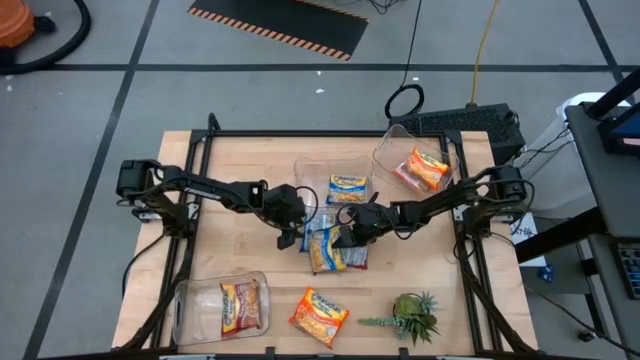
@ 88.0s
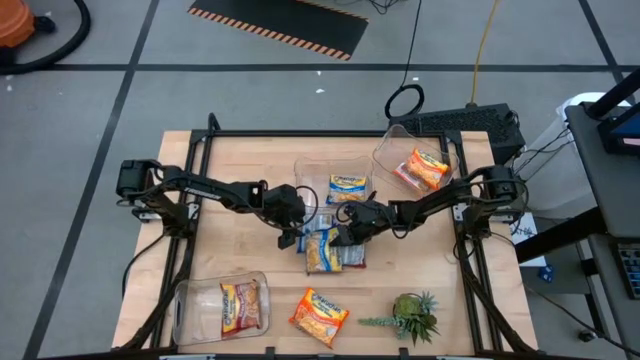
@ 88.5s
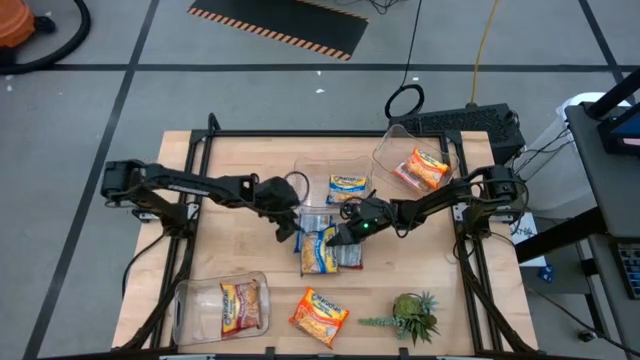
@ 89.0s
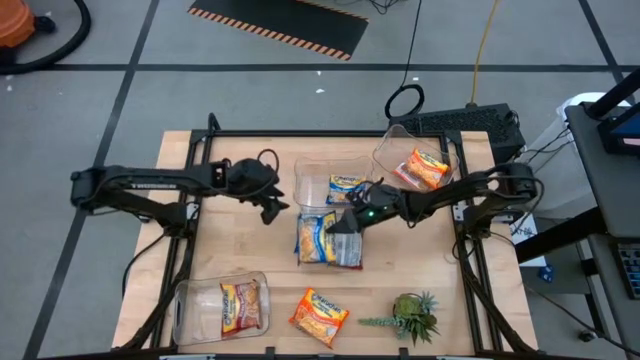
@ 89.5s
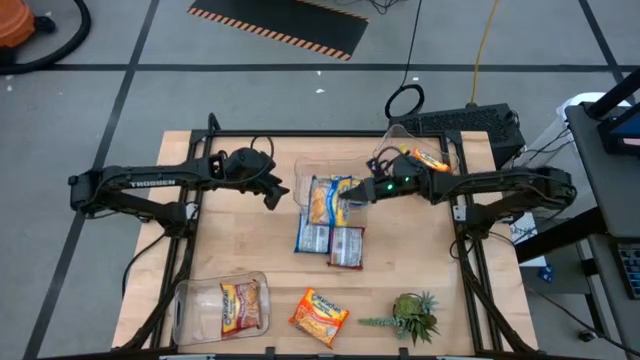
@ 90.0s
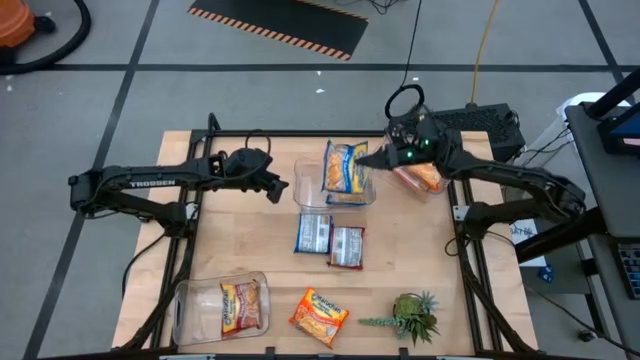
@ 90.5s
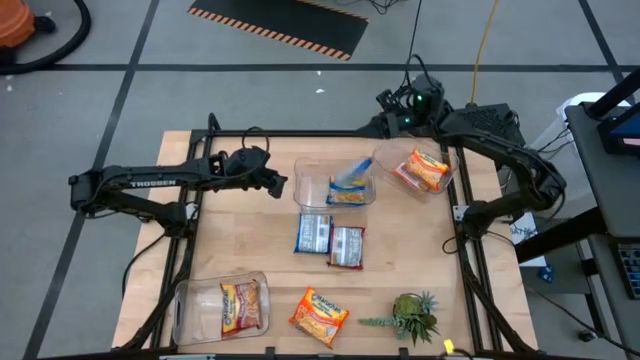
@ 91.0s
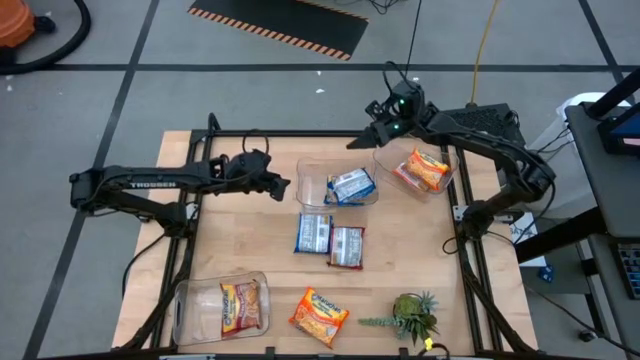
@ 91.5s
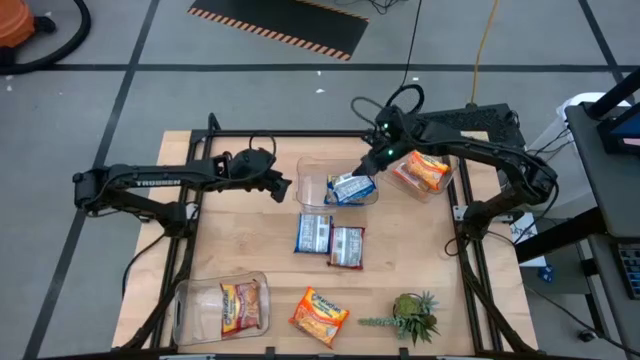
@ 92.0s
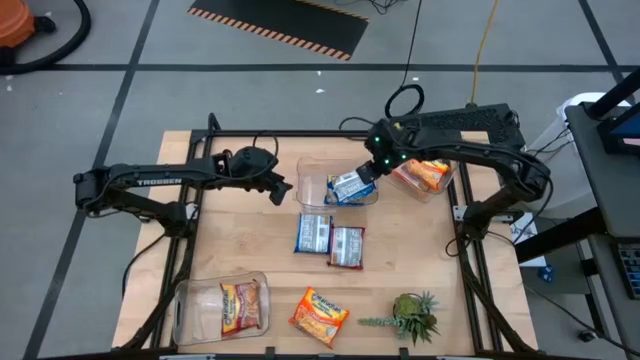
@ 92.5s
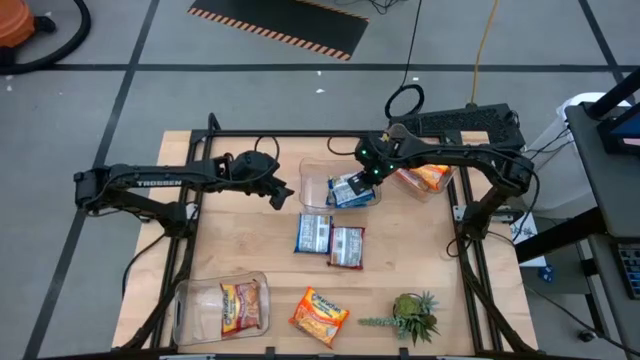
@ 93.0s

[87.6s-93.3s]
Task: Sort Maruchan noodles
Stack the bottom blue noodle pack on top of the other blue noodle pack into the top left transparent bin

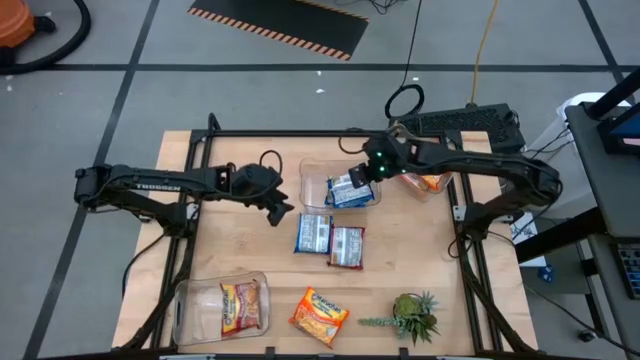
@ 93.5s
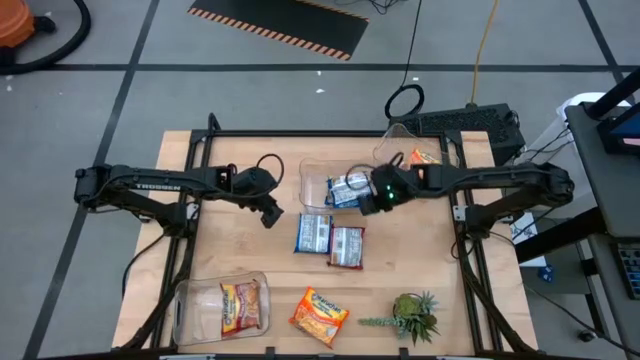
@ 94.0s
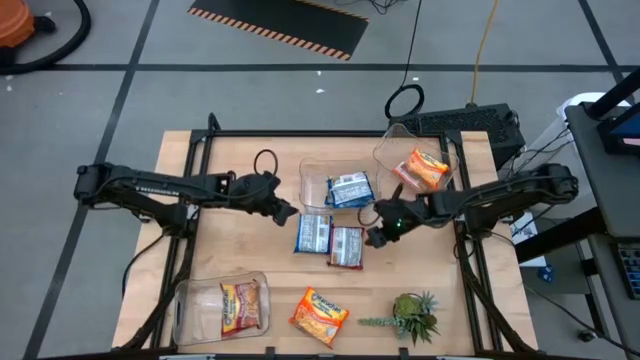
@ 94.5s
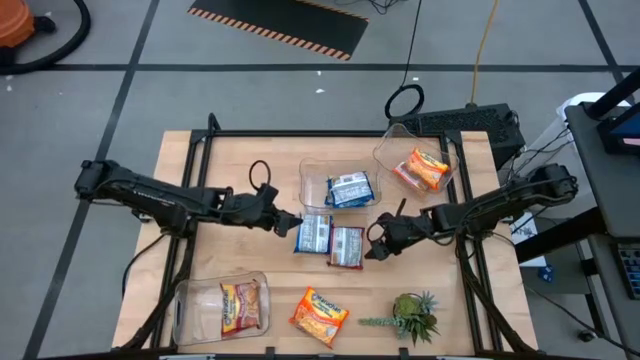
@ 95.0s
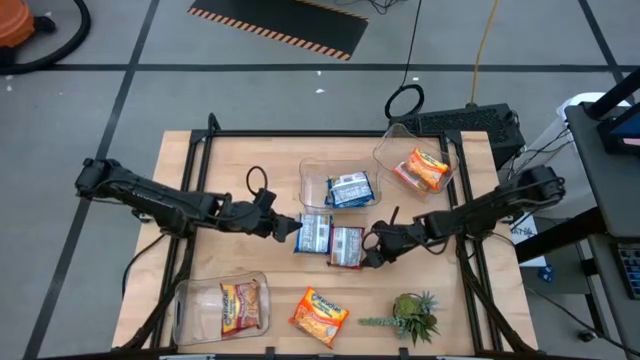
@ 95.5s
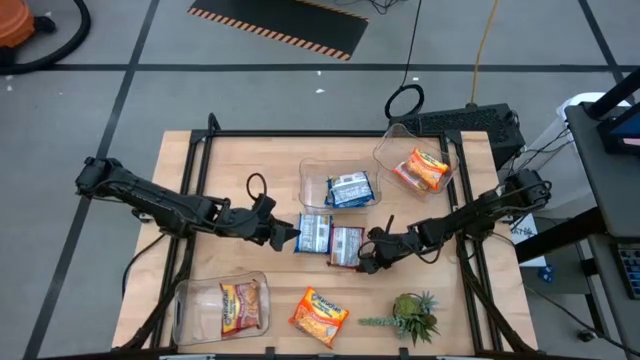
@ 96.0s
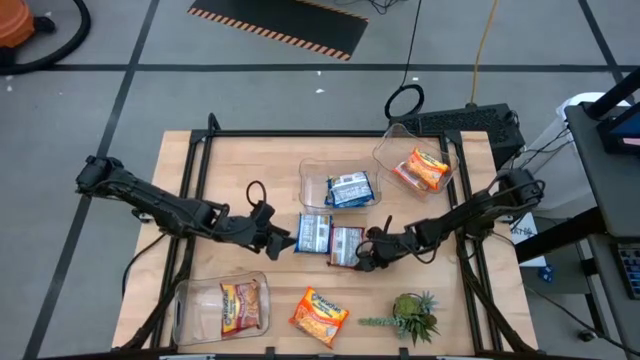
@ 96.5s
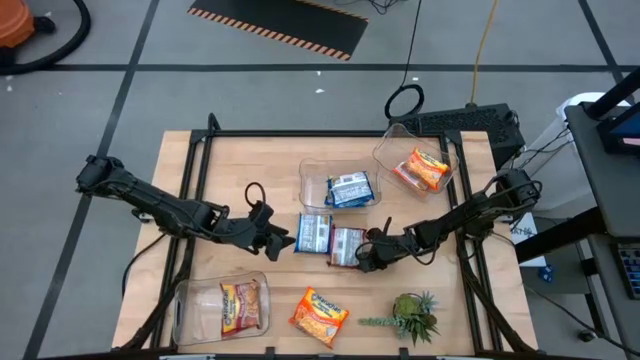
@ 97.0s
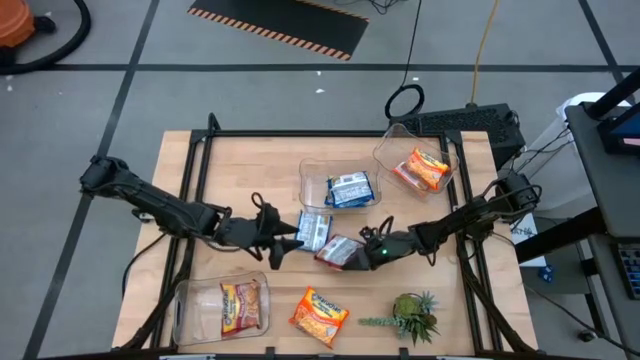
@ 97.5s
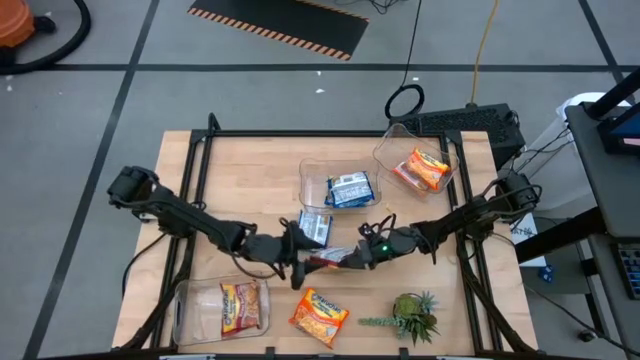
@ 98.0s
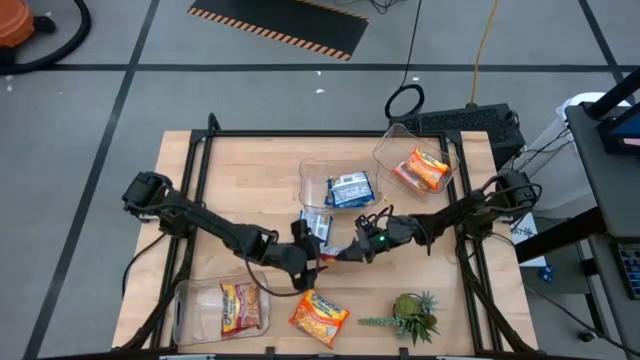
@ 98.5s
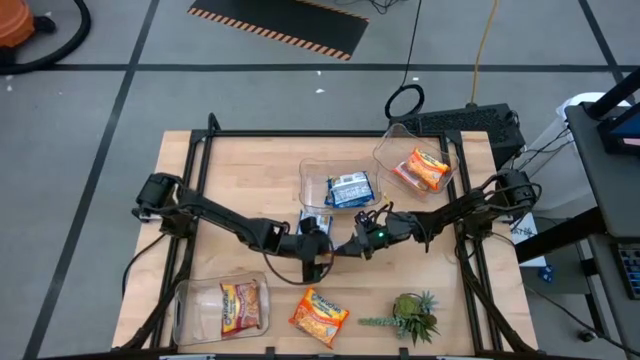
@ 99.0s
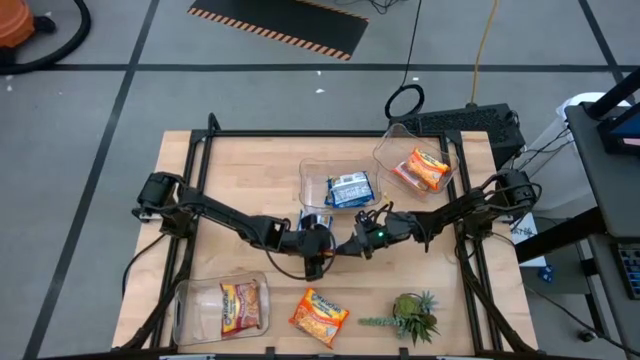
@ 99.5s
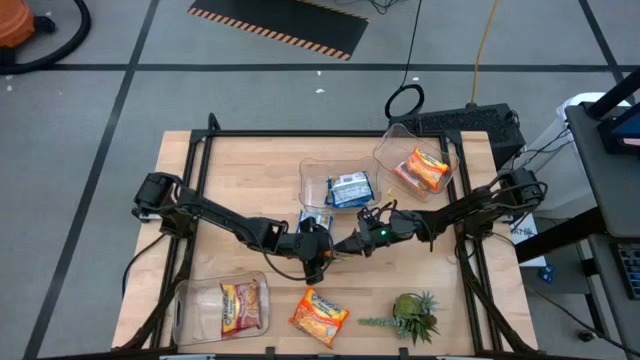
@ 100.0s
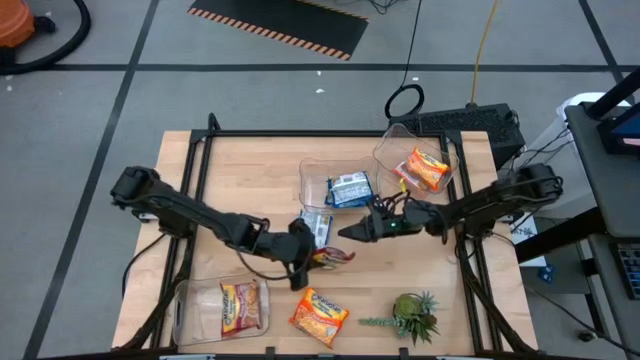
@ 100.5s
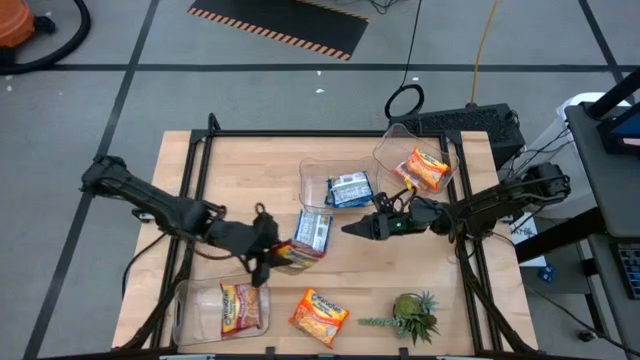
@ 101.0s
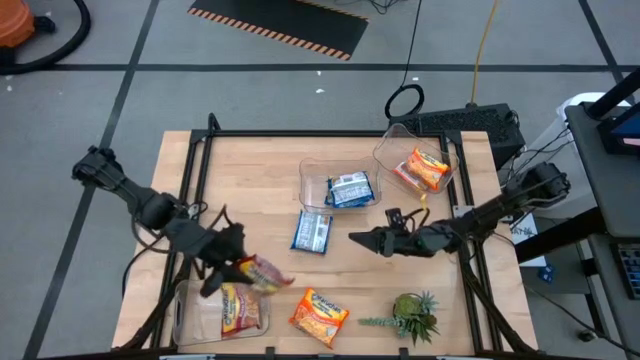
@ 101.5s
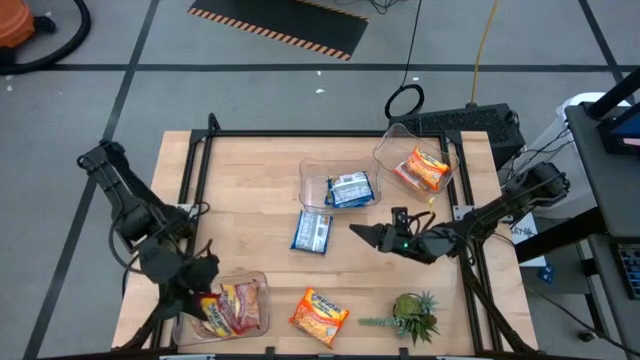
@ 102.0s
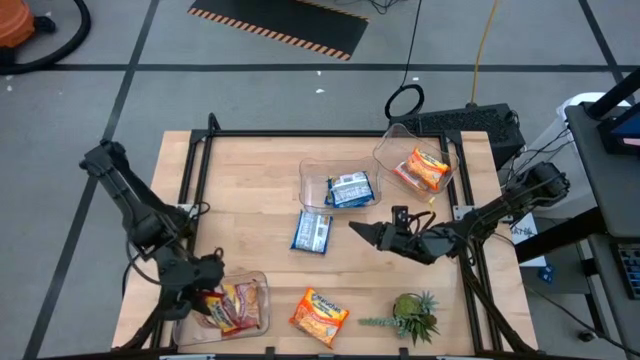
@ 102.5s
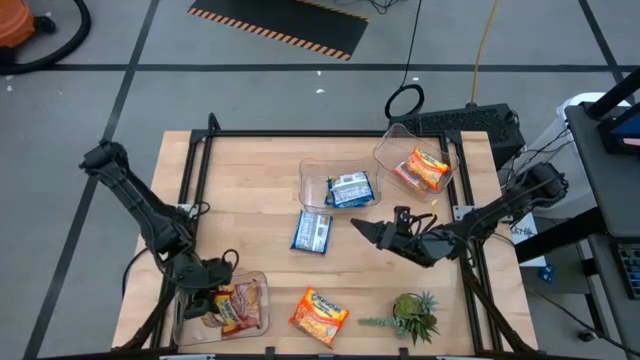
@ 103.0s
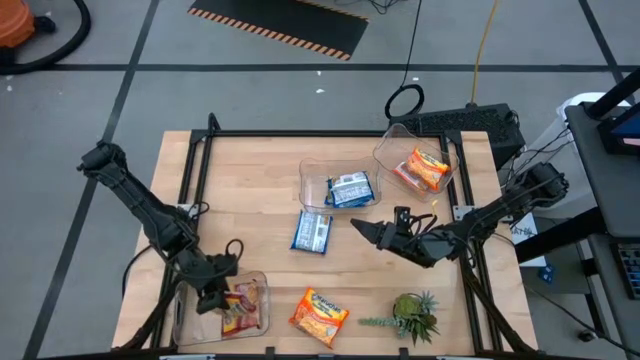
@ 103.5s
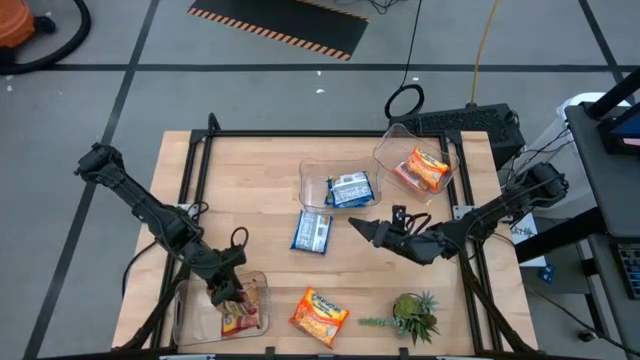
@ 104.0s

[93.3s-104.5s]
Stack the red noodle pack on top of the other red noodle pack into the bottom transparent bin

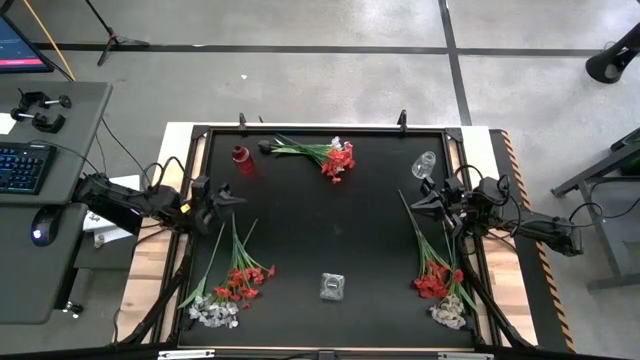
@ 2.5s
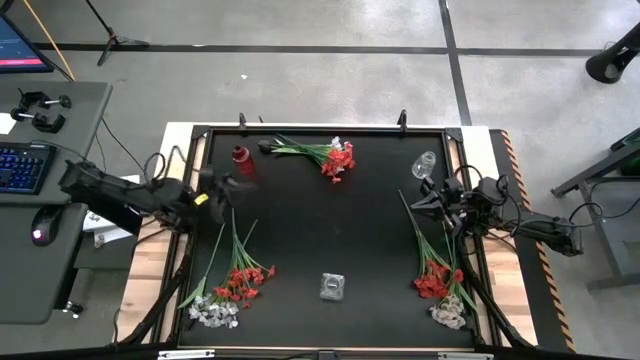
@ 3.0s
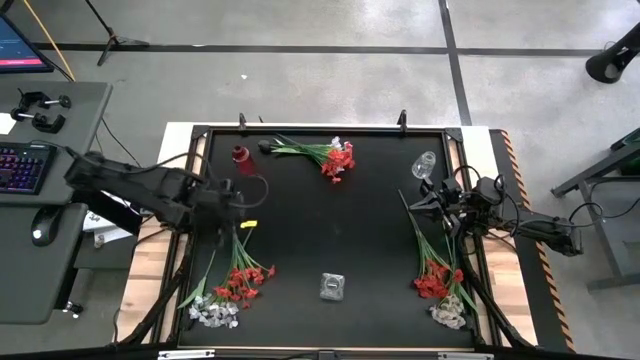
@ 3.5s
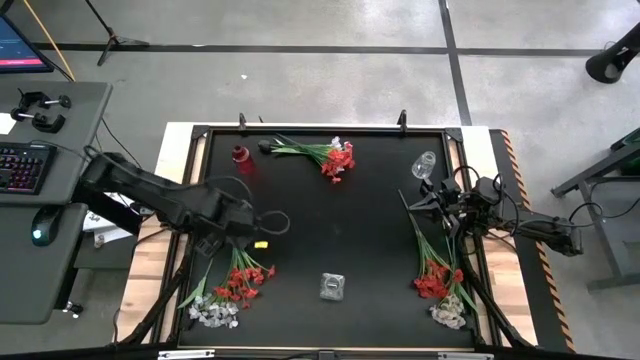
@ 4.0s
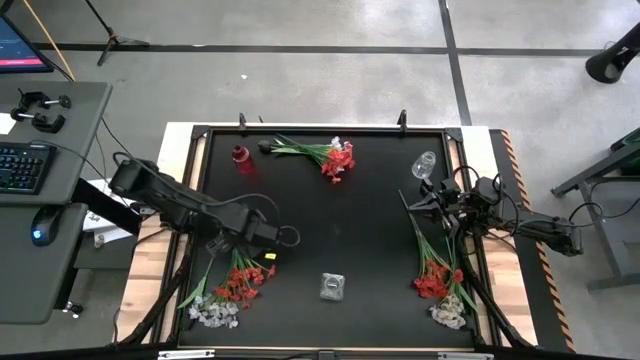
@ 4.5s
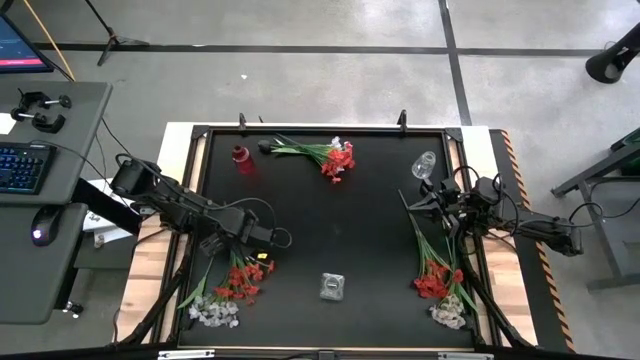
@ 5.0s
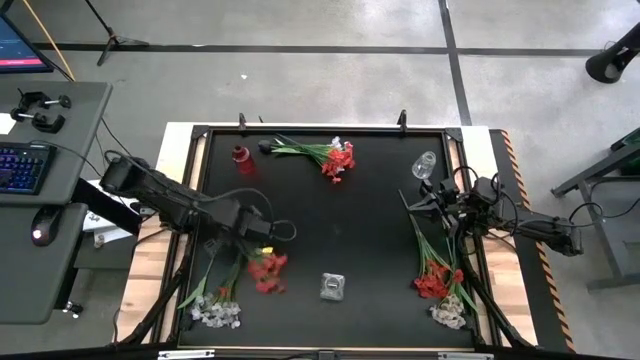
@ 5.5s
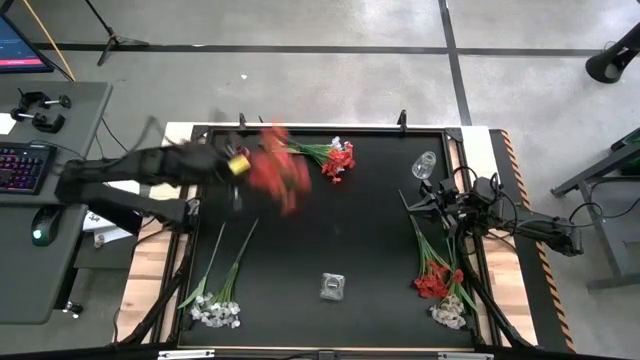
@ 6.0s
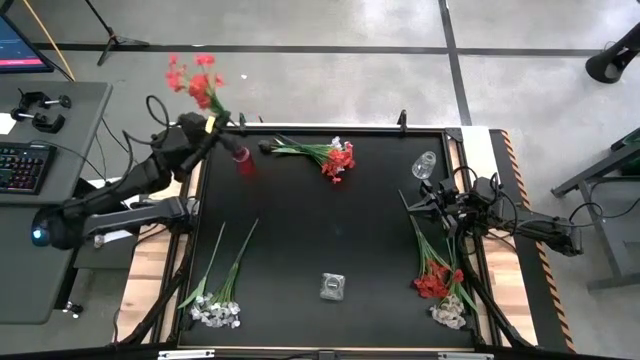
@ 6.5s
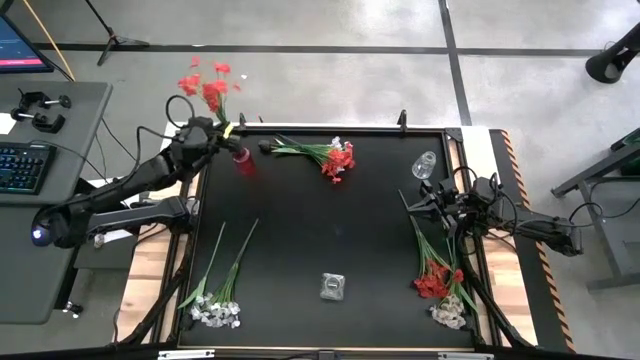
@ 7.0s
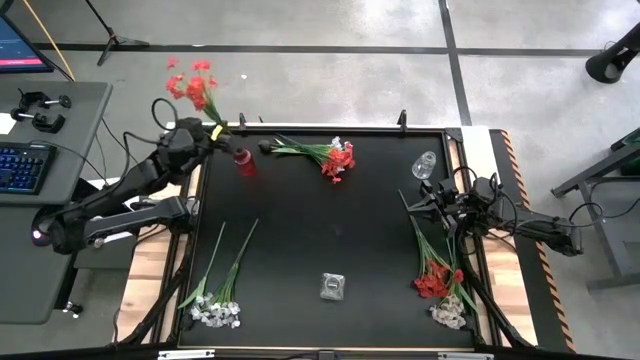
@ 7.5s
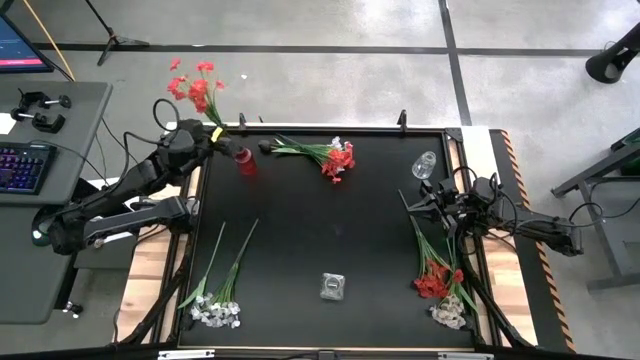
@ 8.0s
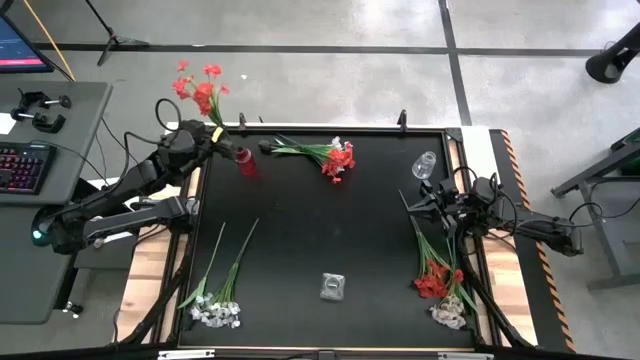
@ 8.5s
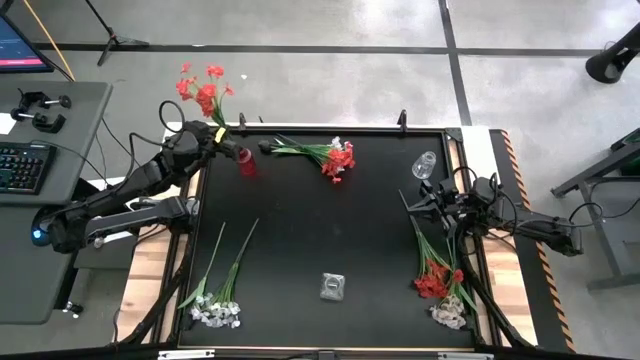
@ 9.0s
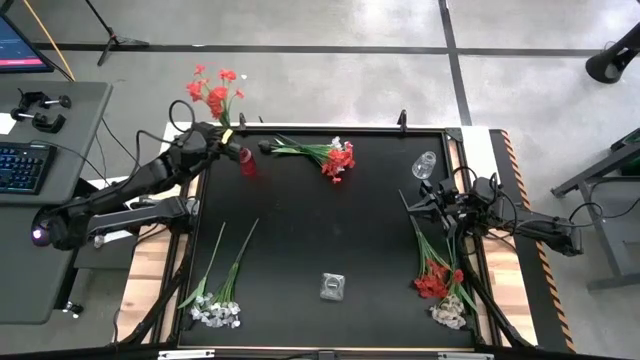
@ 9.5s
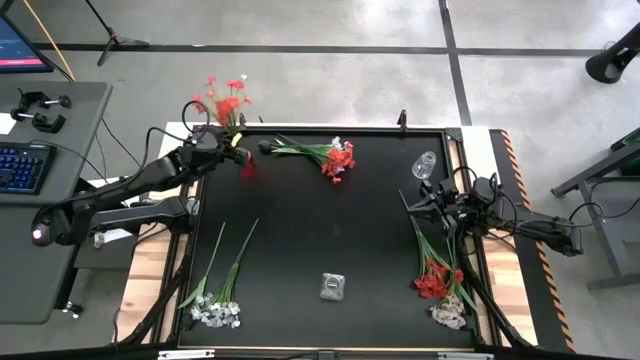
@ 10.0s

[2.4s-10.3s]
Task: Sort flowers into vase by color
Put the bottom left orange flowers into the red vase
